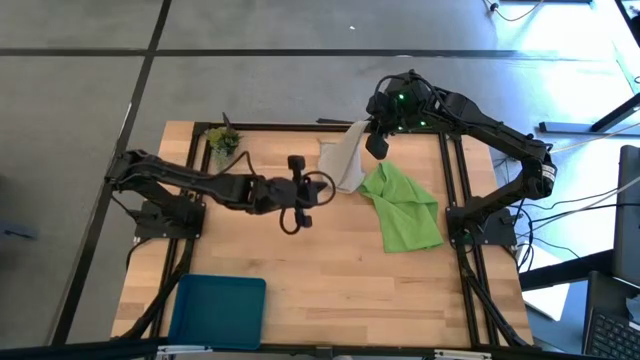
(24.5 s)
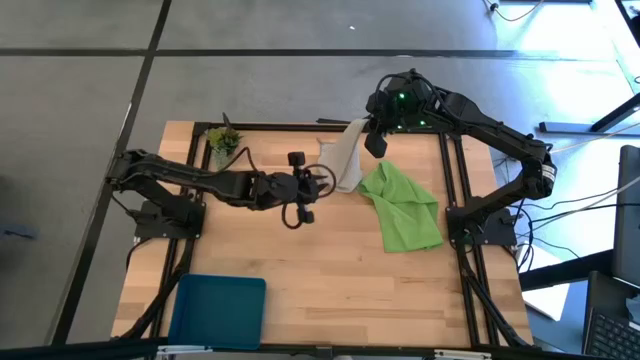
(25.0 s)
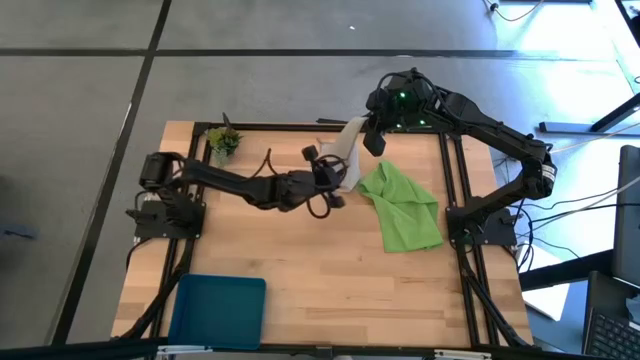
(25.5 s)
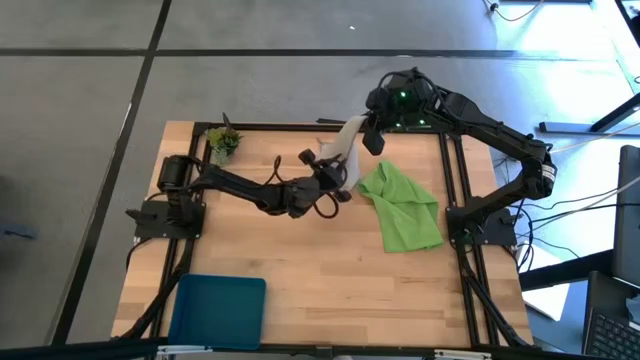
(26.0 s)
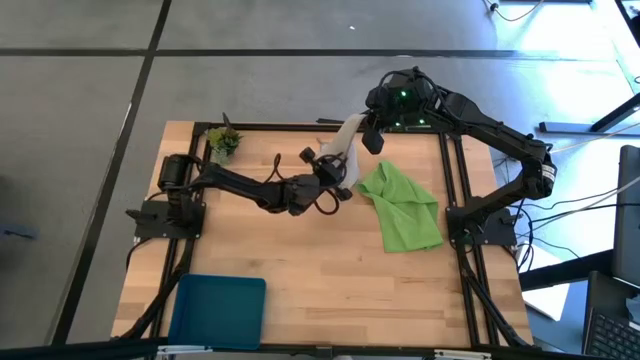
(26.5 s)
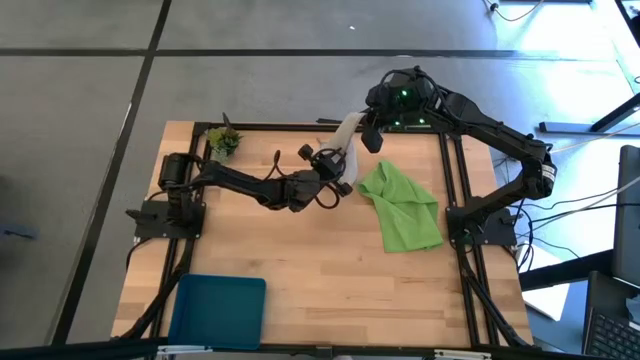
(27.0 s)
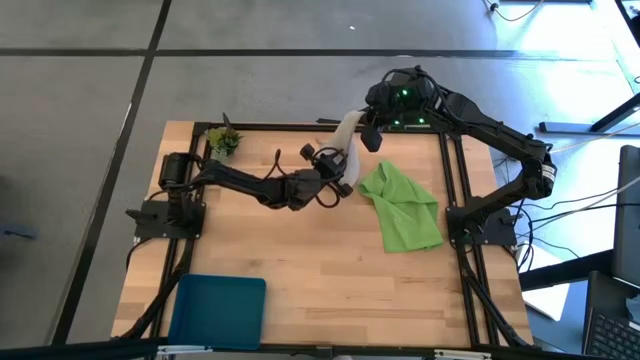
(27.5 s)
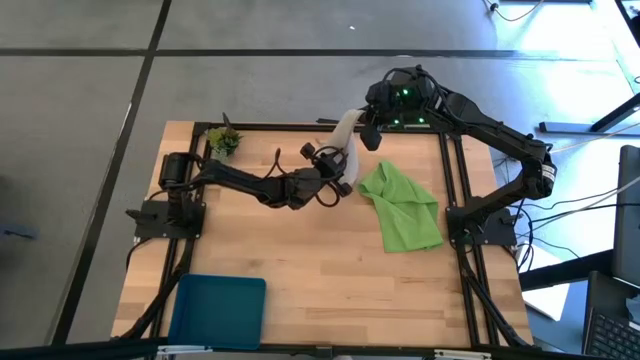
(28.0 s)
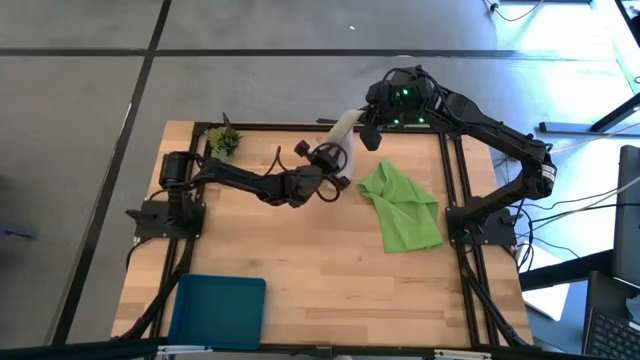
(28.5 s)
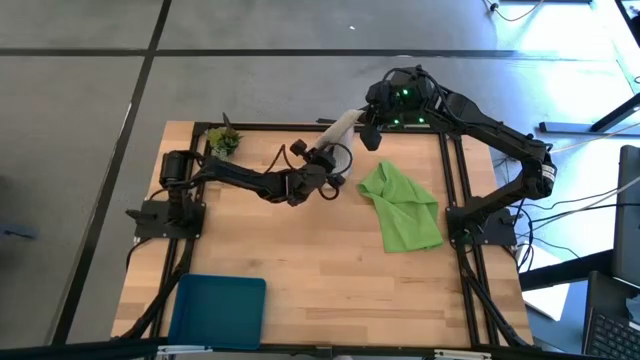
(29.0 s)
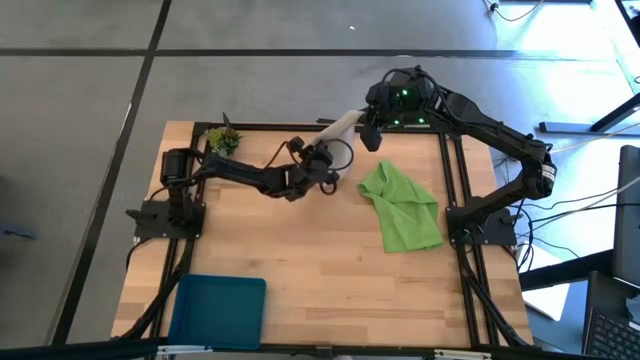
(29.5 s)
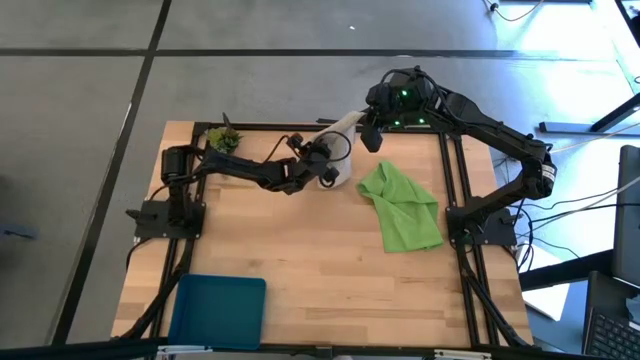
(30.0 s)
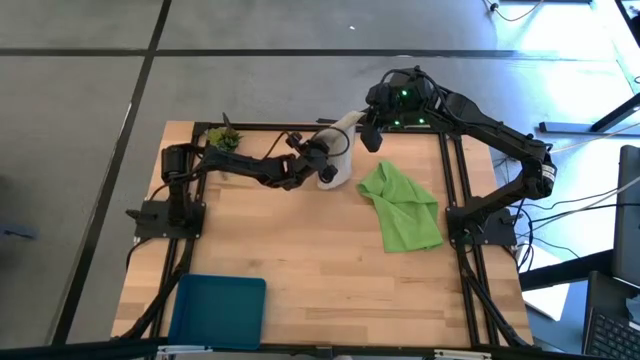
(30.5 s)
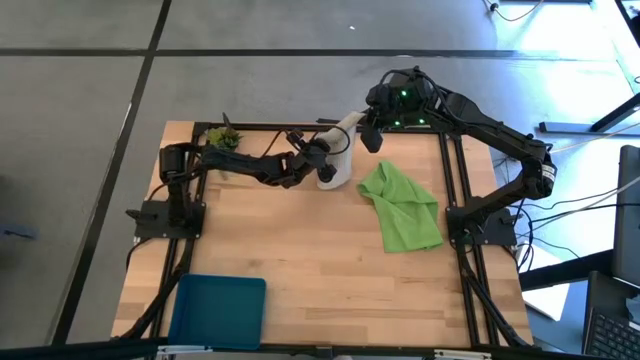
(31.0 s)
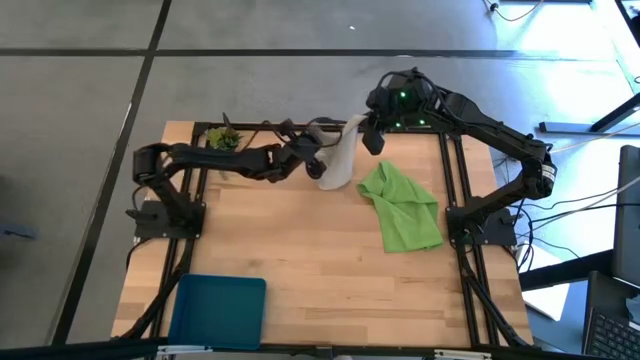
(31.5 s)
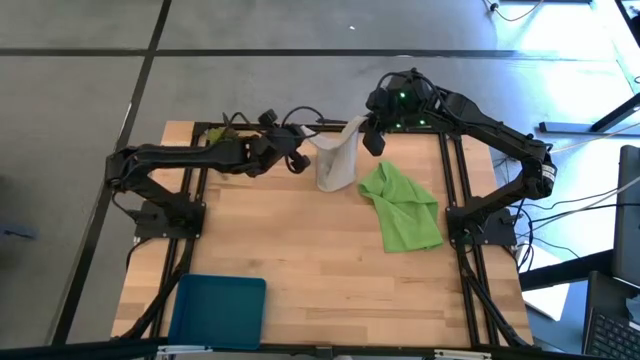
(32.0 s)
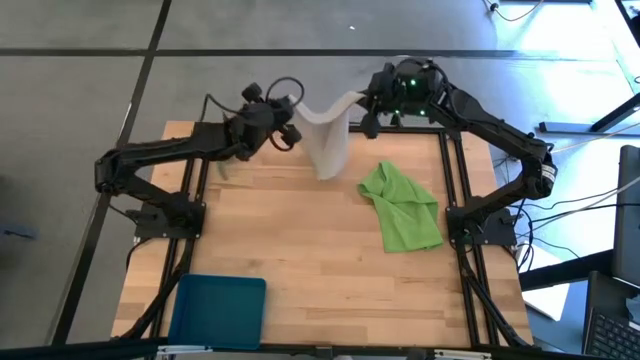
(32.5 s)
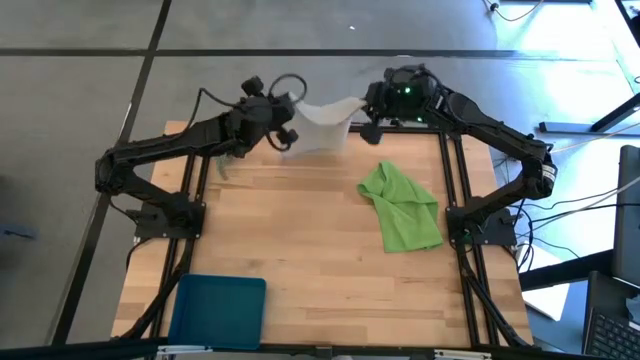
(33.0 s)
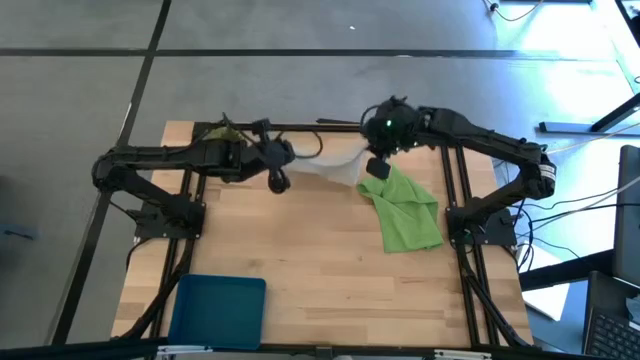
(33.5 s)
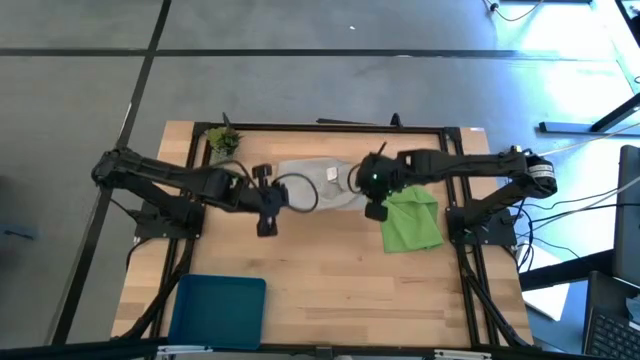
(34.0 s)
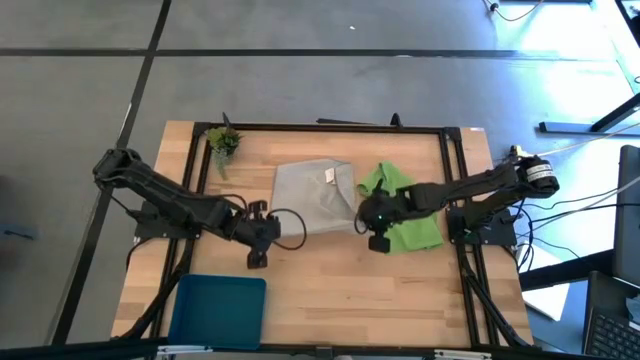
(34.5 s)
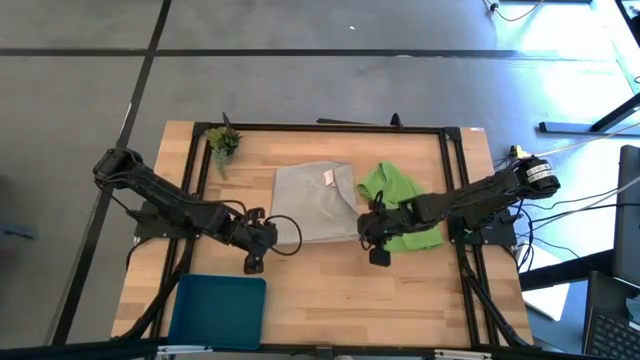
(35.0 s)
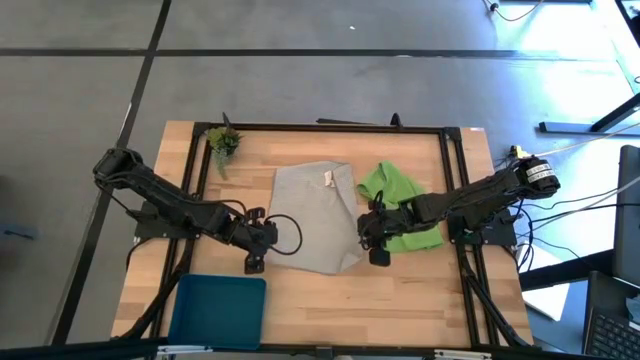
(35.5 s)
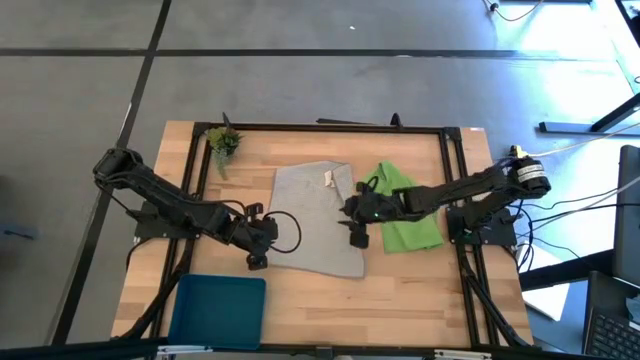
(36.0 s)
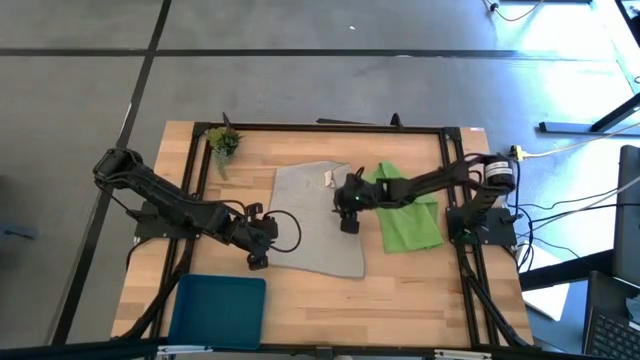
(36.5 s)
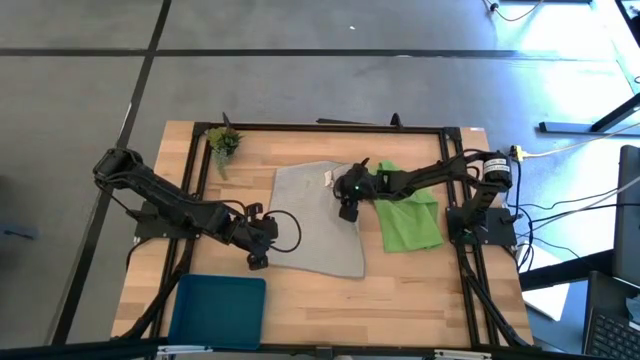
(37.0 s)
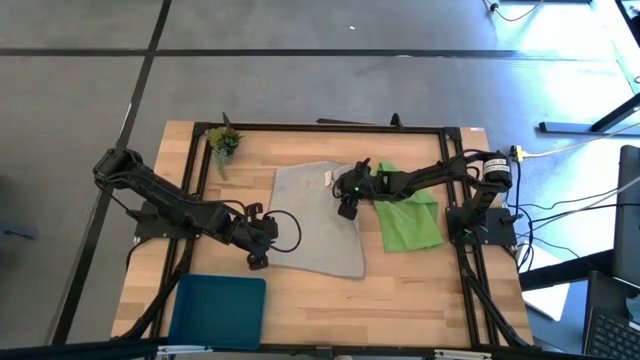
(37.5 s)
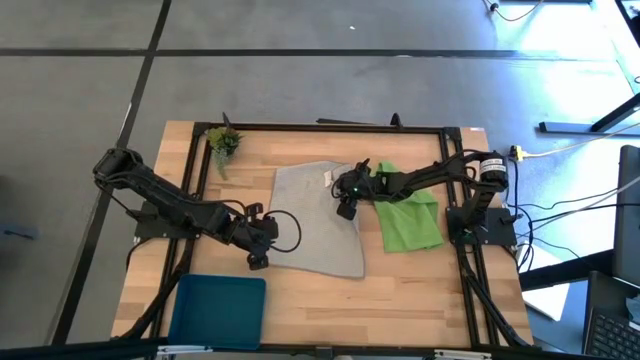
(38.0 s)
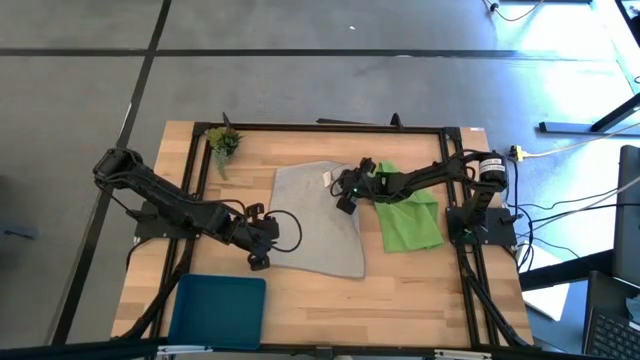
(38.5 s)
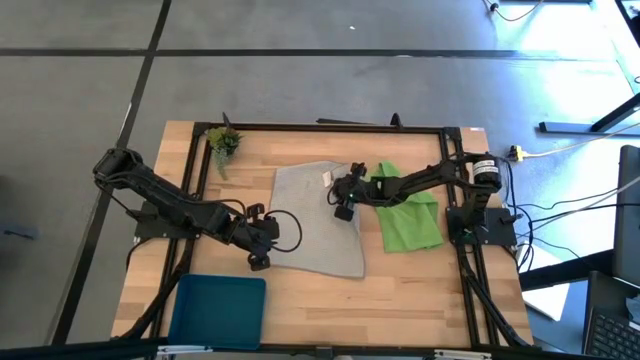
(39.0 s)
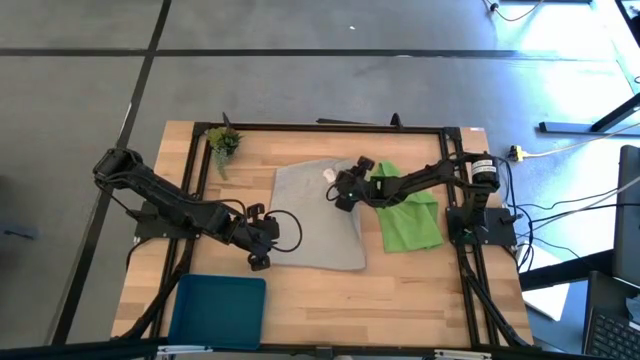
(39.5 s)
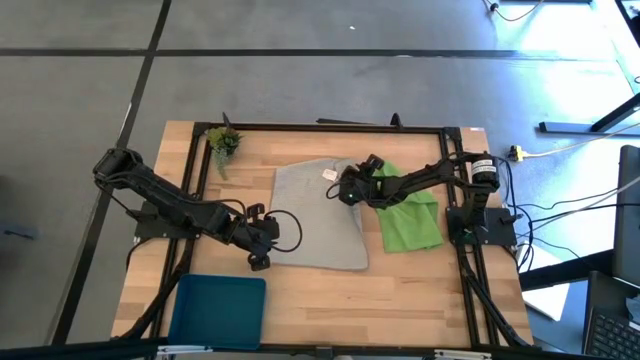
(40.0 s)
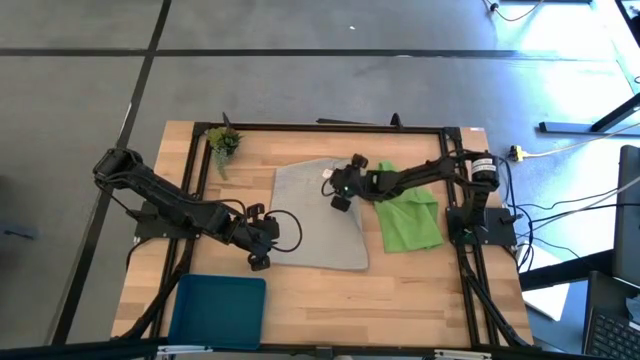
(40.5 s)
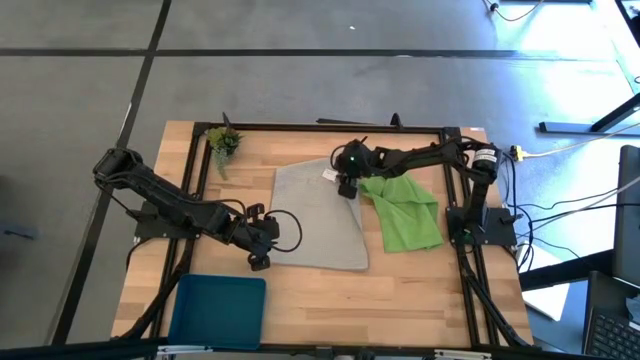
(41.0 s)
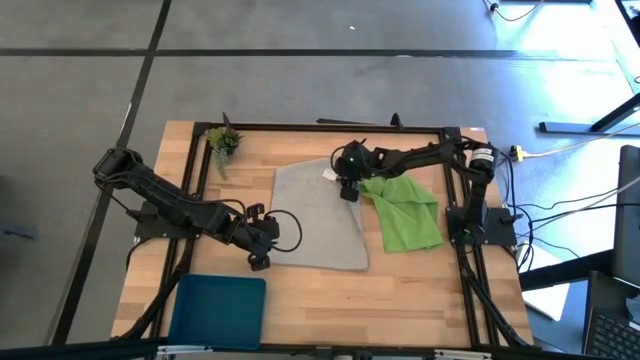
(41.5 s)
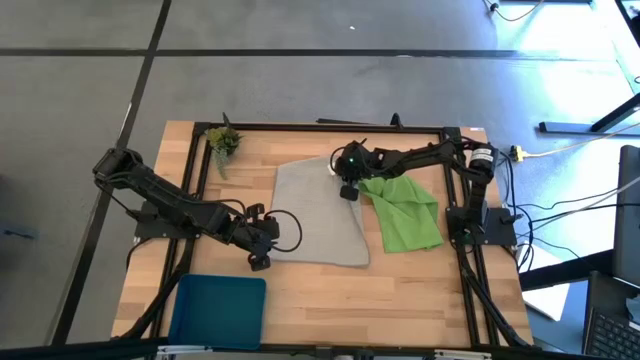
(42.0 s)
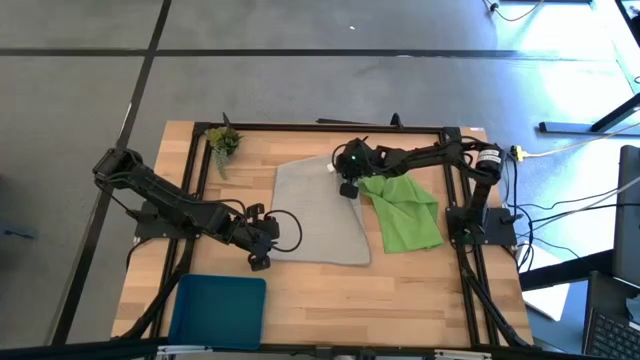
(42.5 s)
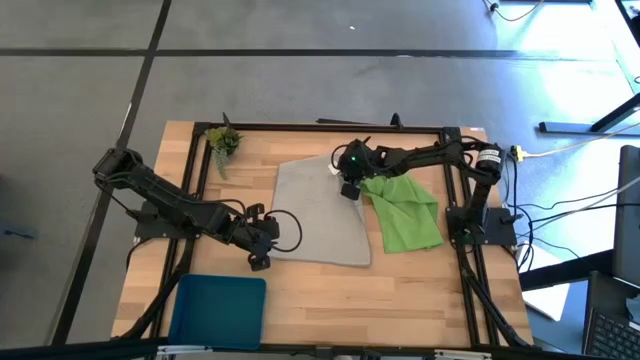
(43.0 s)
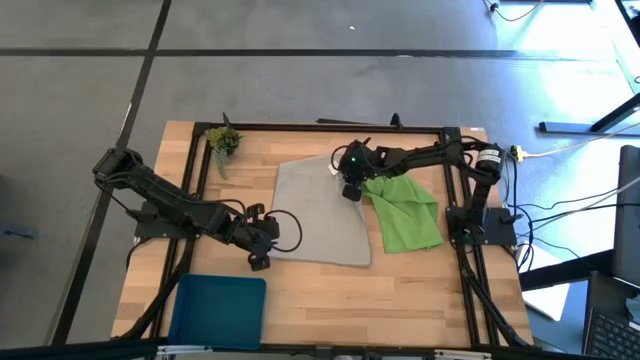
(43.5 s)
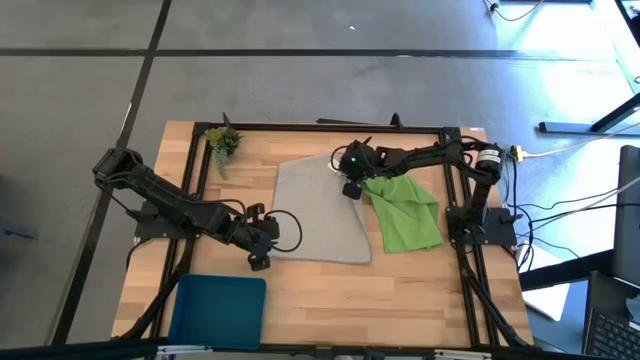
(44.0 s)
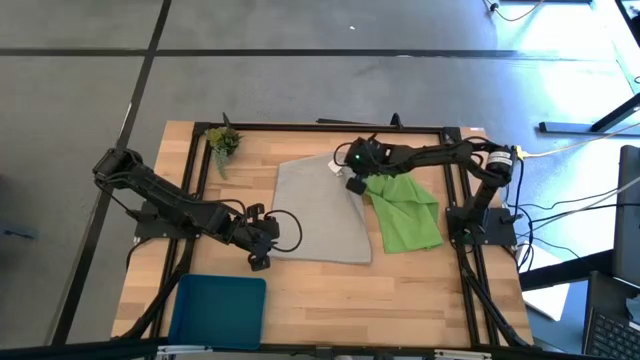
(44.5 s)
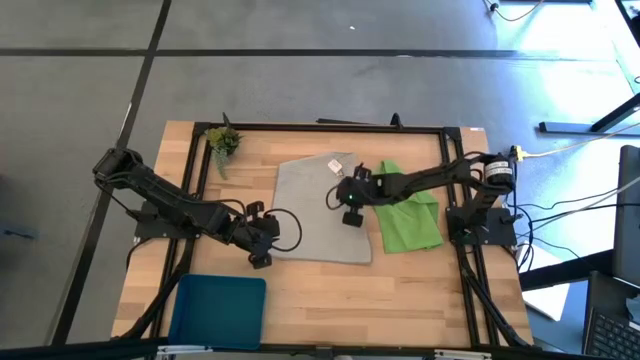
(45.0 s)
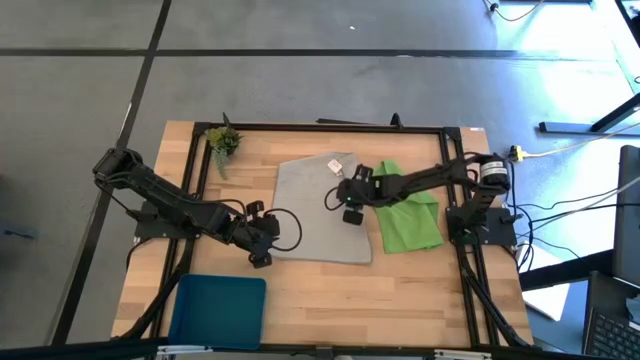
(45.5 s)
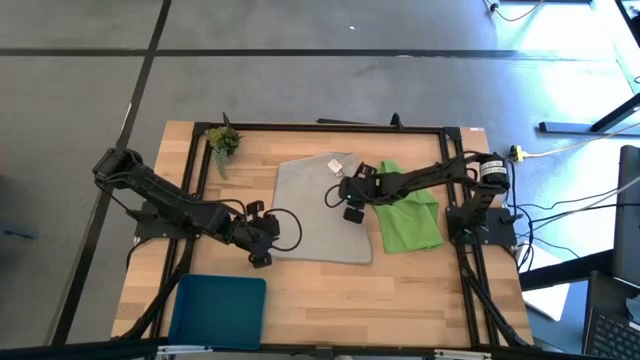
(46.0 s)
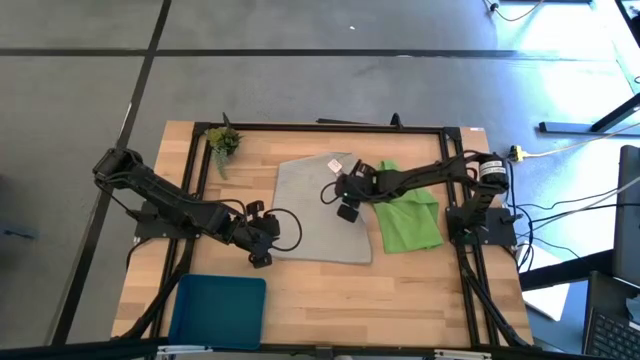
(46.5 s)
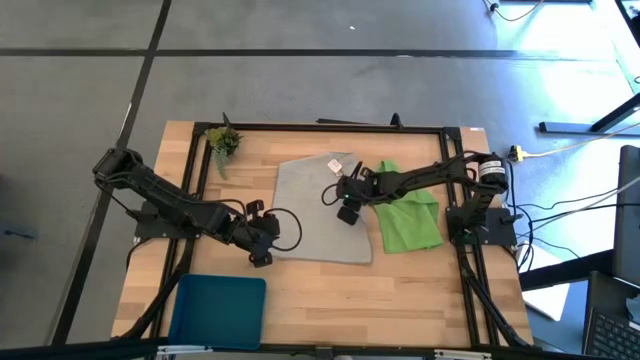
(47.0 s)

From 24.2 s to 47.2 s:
Task: Fold microfiber towels
Fold the gray microfiber cloth
